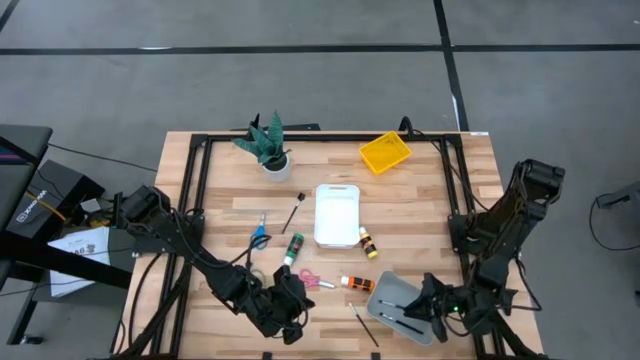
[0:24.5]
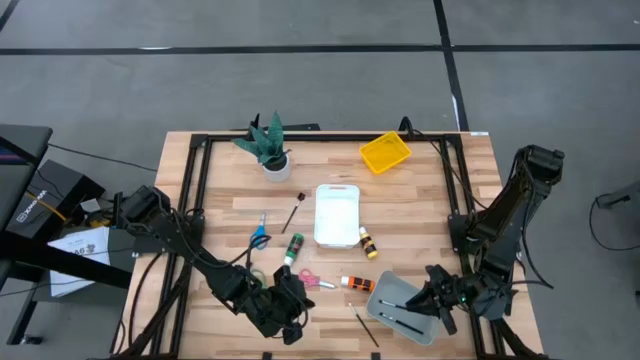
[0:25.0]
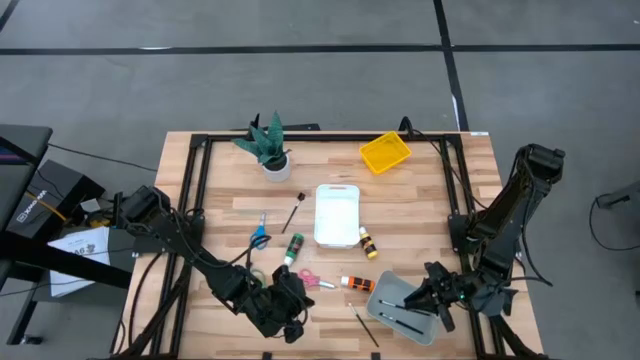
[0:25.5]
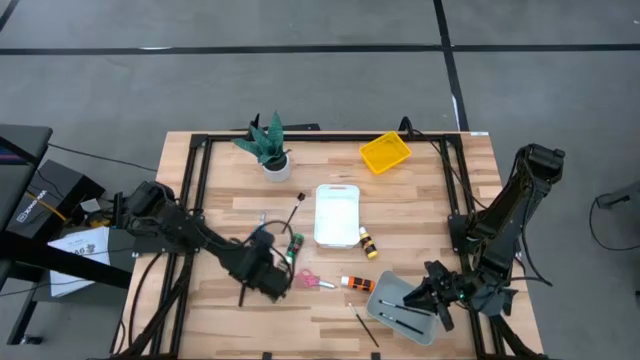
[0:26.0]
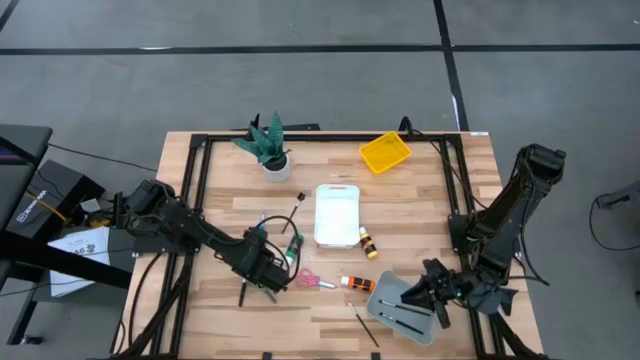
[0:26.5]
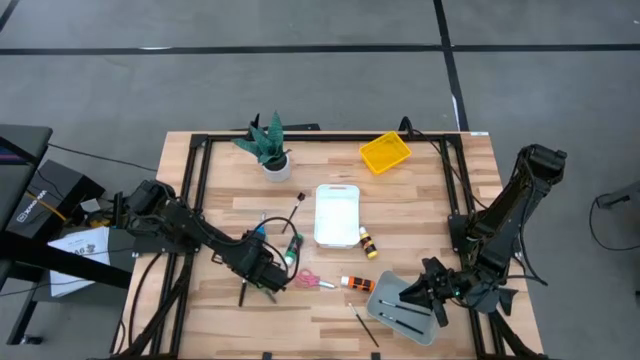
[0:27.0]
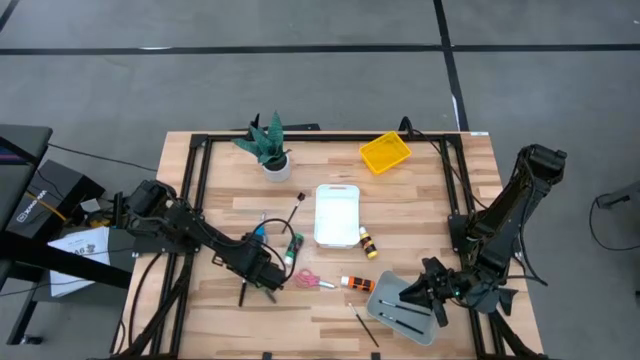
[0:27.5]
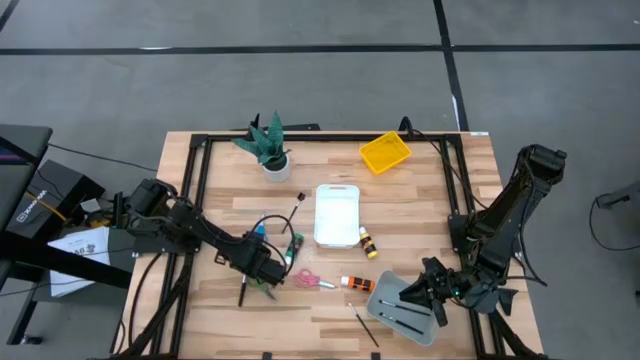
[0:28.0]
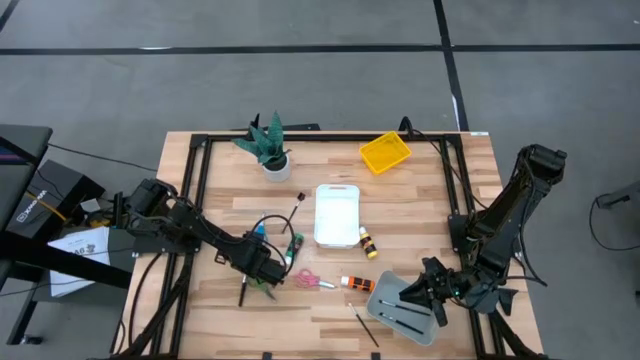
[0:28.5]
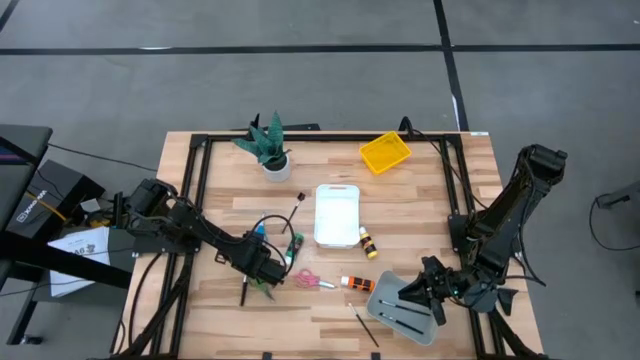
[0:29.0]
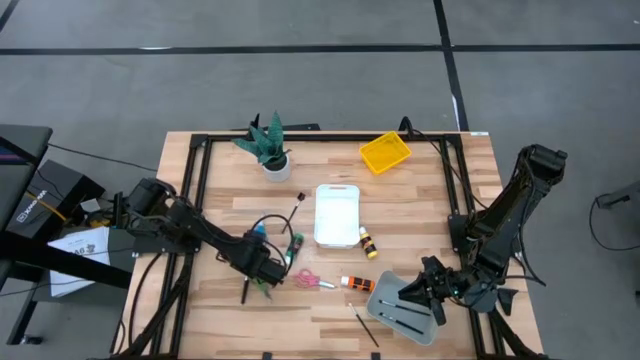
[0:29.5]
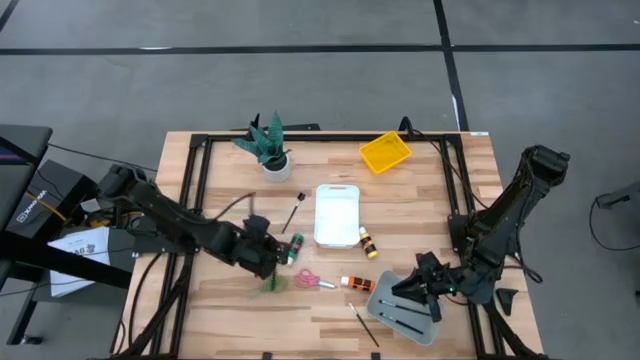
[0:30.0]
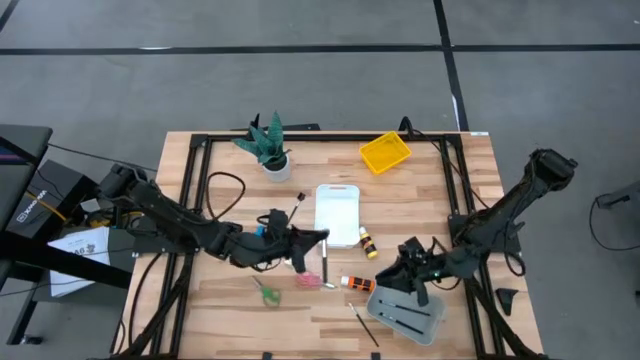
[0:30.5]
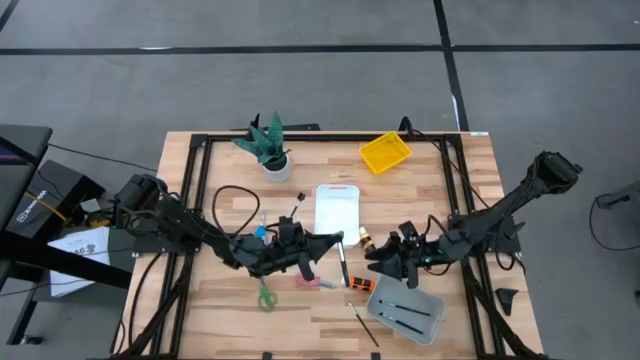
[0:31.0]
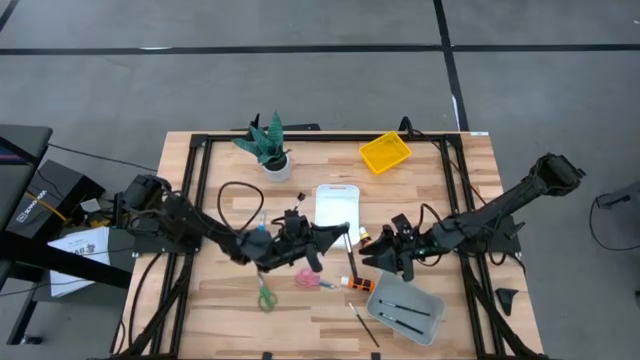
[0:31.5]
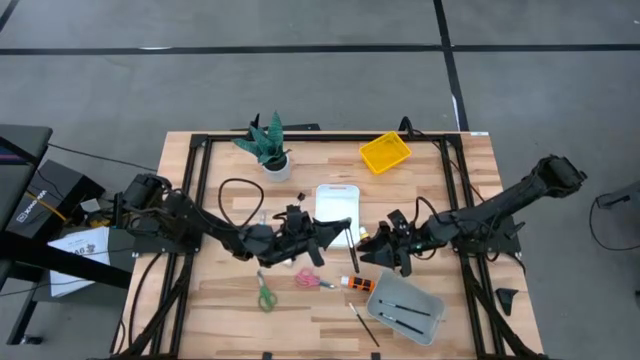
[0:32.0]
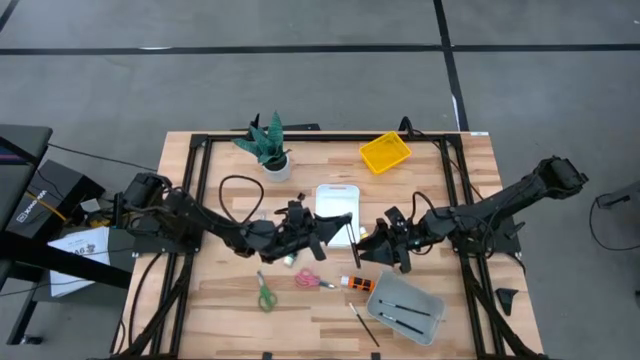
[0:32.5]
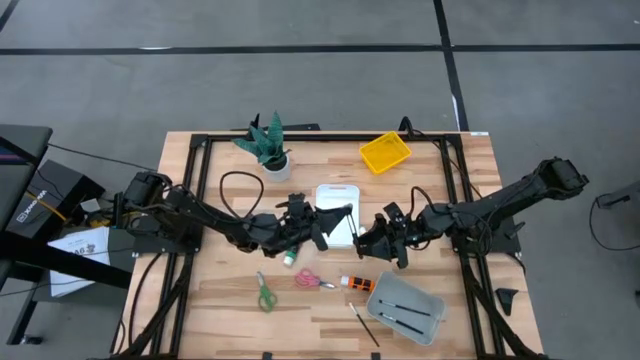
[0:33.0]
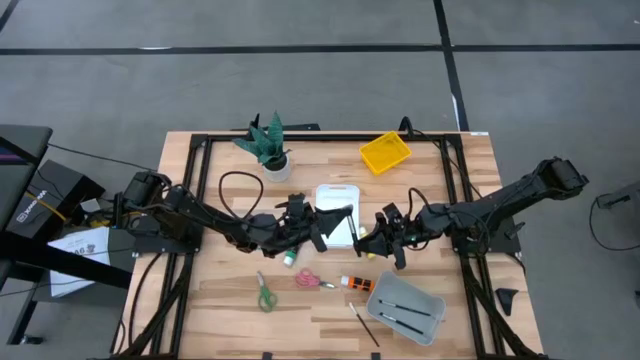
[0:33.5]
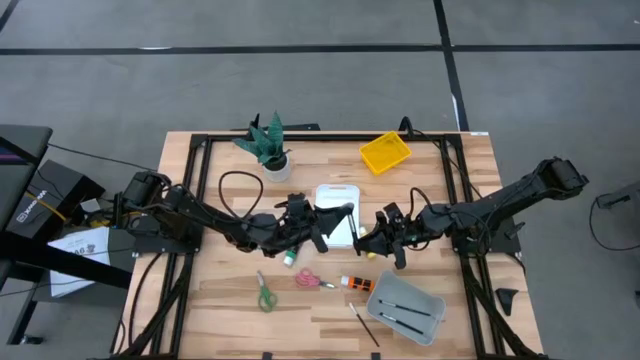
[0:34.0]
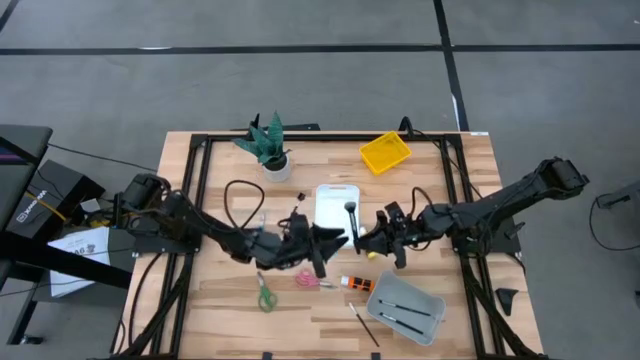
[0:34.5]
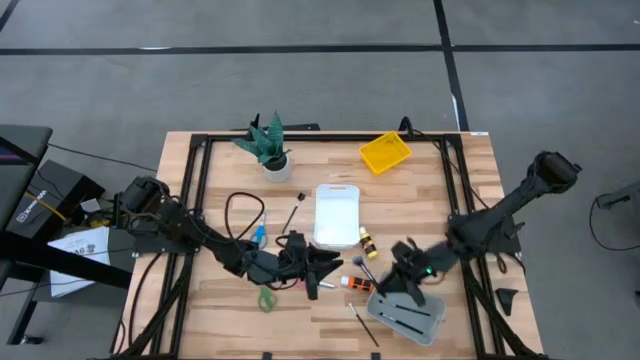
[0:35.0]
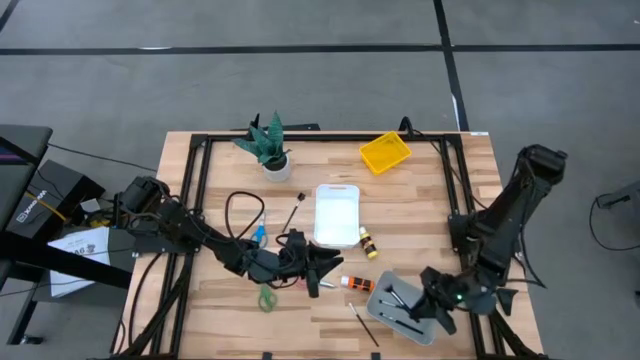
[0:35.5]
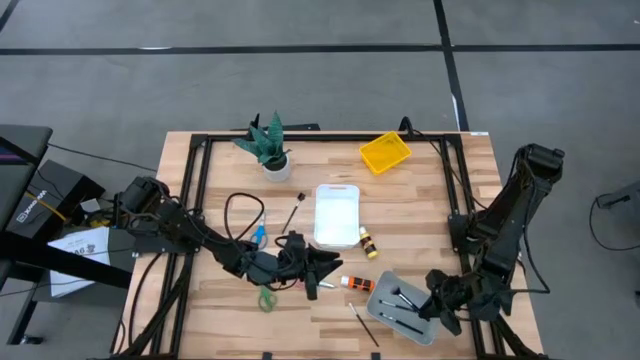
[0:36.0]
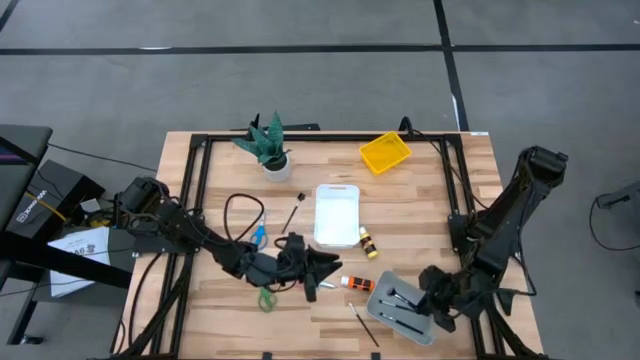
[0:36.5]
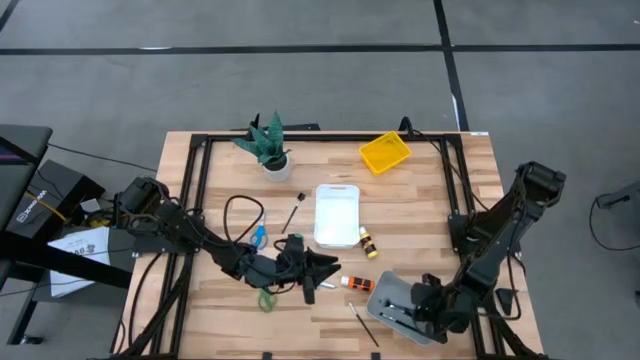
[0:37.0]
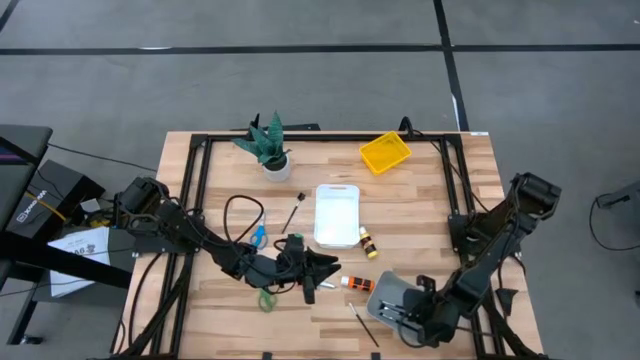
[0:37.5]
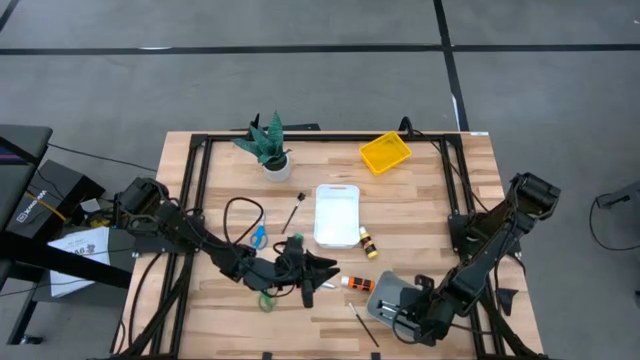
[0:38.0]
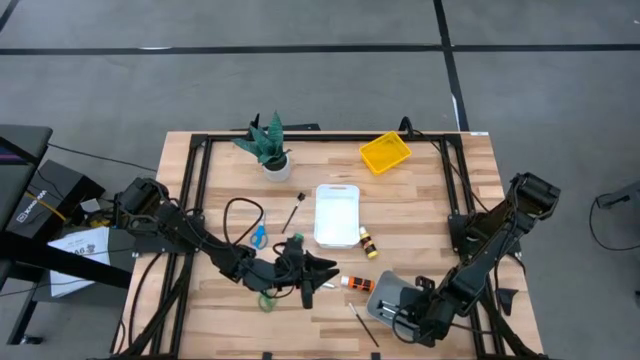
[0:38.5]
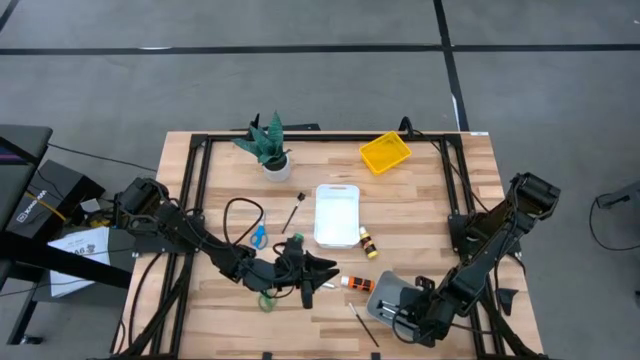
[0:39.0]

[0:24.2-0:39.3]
Task: Pick & Place Paint Supplies
Put the powder brush into the gray bin

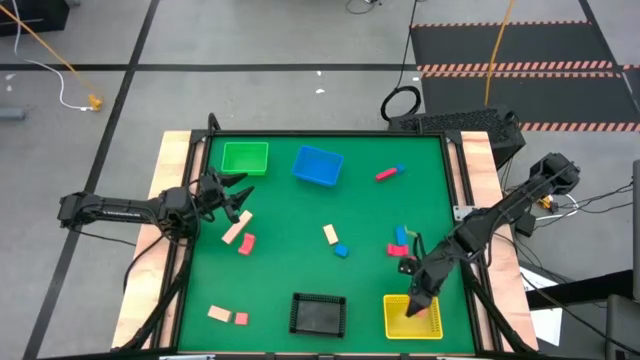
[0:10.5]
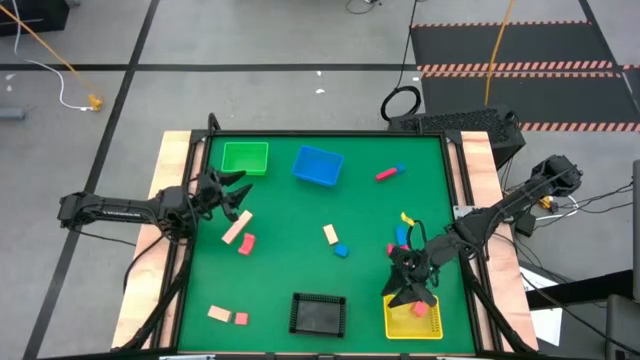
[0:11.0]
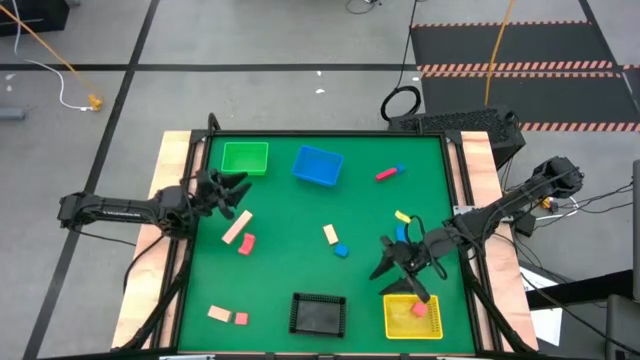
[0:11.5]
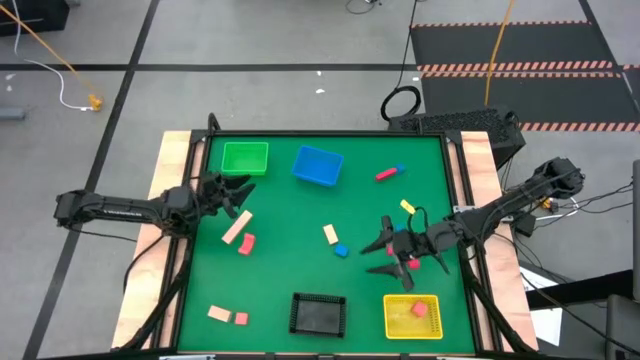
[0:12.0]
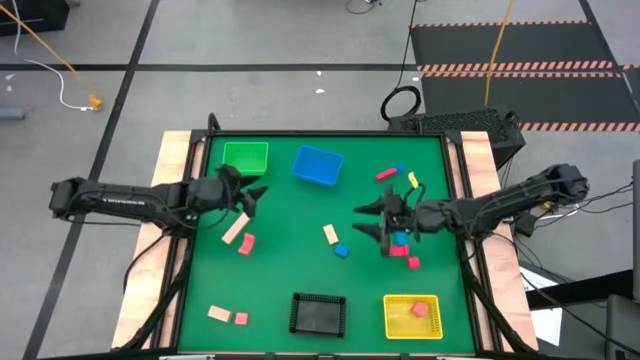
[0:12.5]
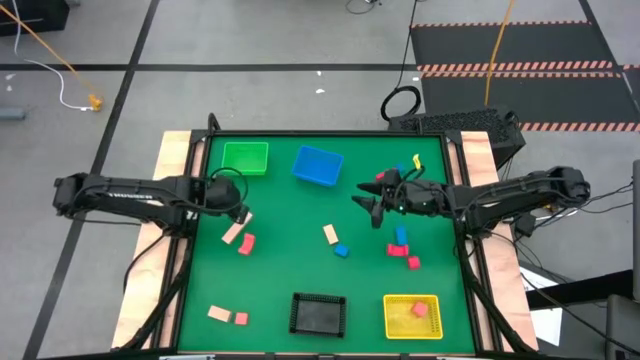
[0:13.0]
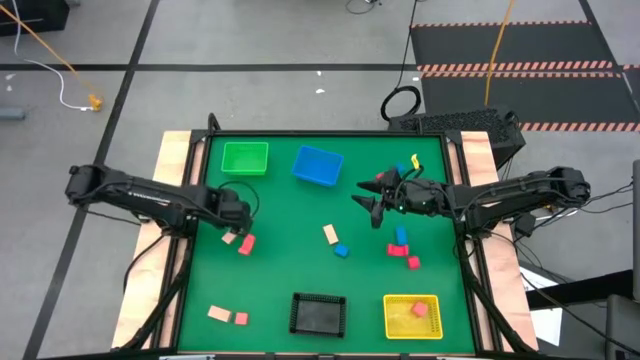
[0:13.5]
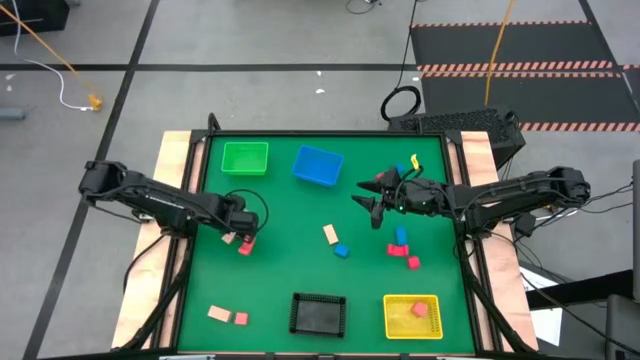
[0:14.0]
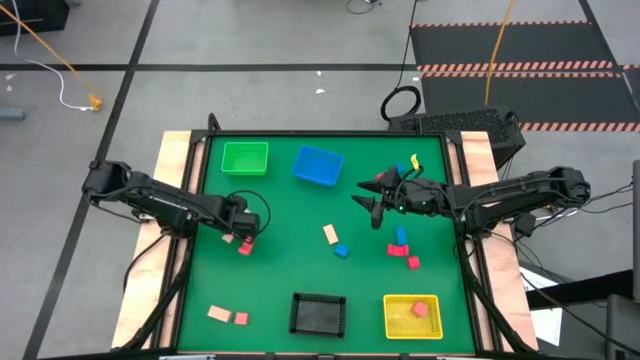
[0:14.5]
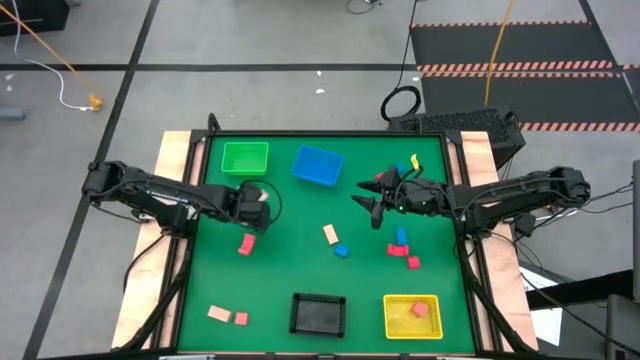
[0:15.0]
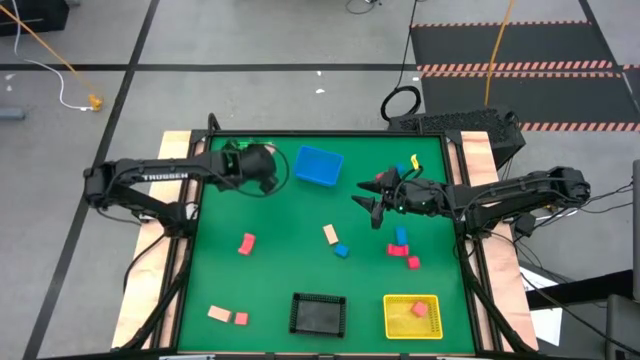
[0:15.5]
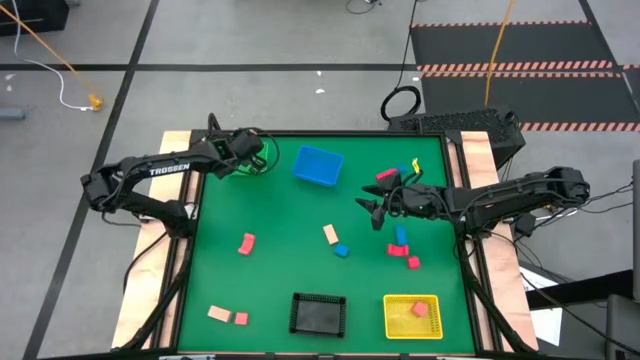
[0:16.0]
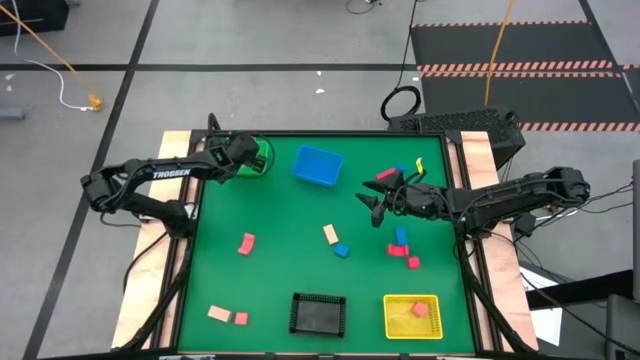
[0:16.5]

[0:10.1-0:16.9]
Task: Sort & place blocks by color
Put the top brown wooden block into the green basket
